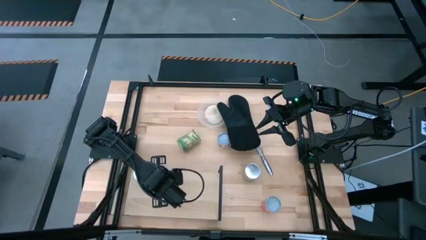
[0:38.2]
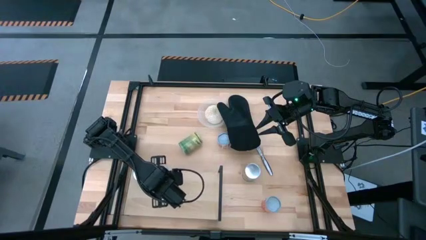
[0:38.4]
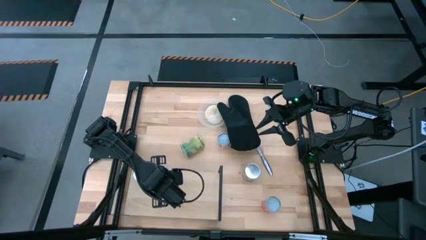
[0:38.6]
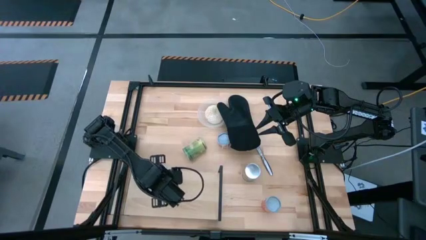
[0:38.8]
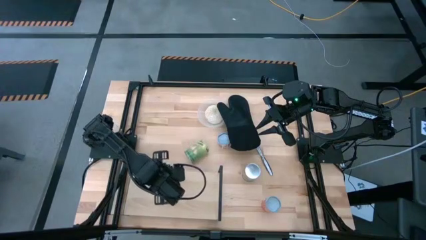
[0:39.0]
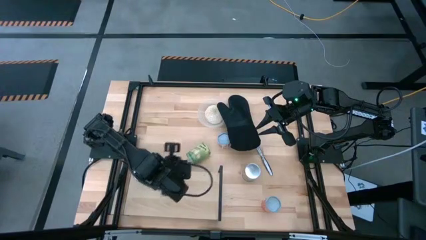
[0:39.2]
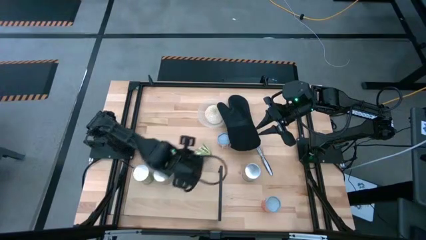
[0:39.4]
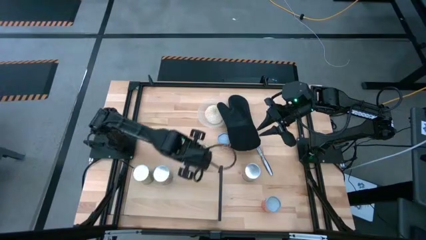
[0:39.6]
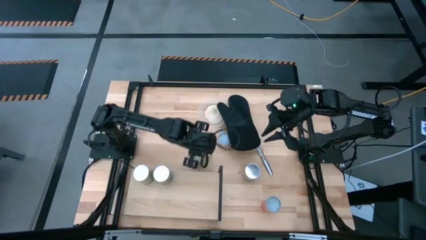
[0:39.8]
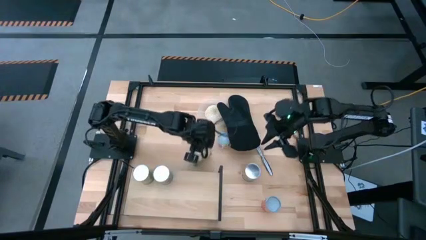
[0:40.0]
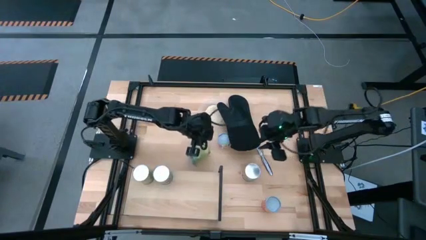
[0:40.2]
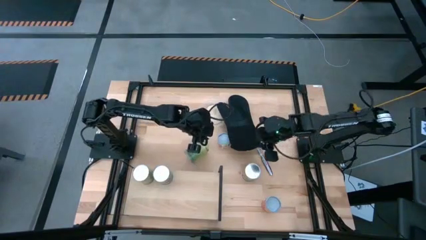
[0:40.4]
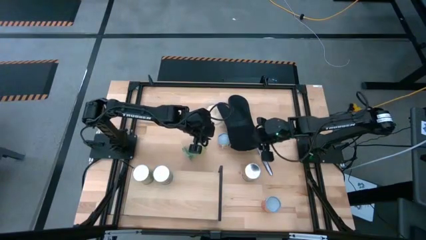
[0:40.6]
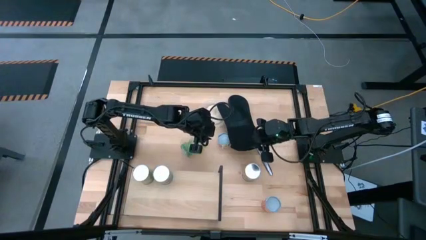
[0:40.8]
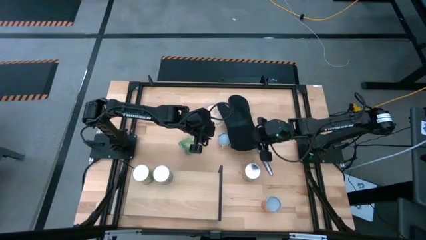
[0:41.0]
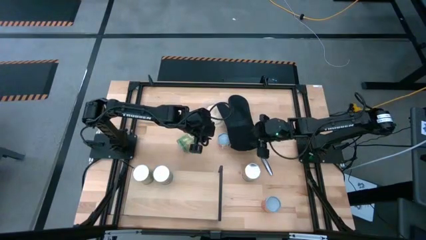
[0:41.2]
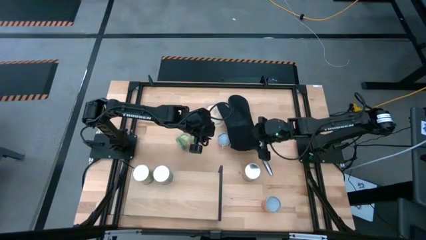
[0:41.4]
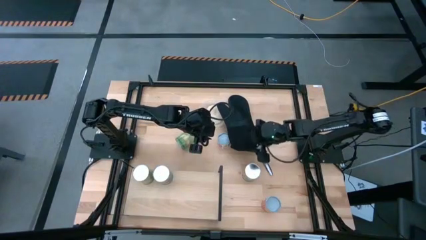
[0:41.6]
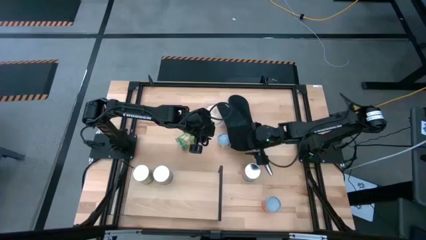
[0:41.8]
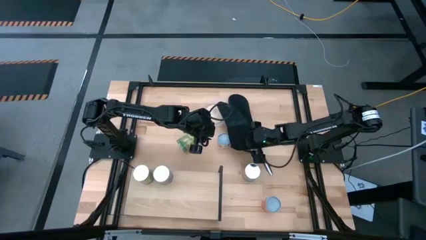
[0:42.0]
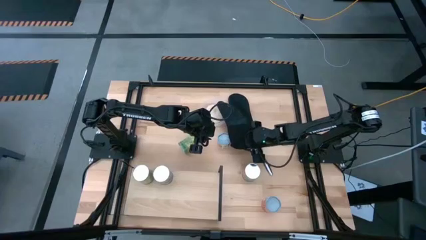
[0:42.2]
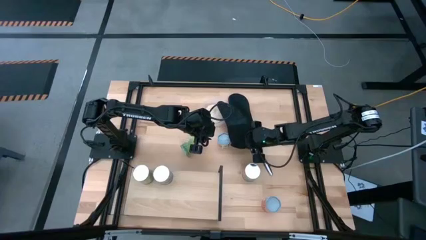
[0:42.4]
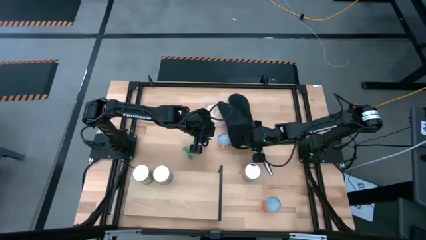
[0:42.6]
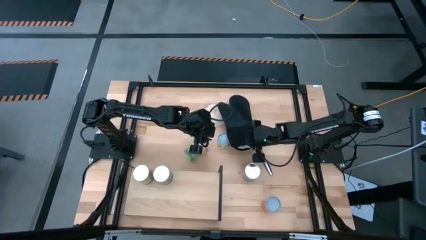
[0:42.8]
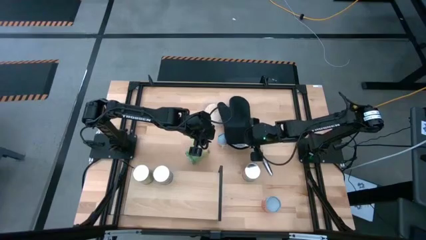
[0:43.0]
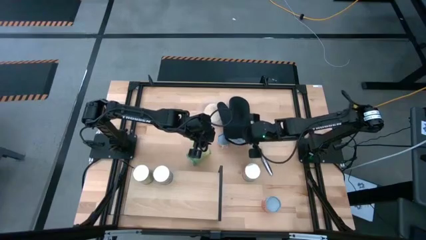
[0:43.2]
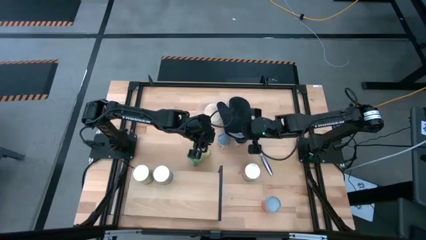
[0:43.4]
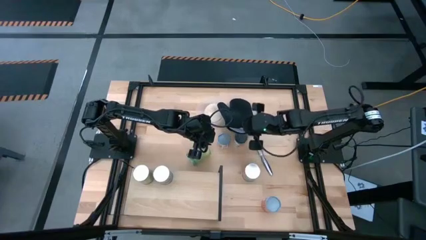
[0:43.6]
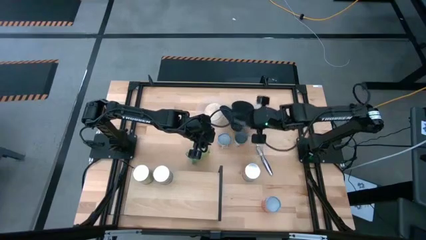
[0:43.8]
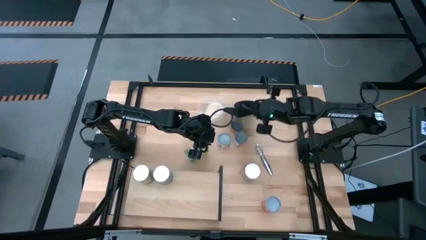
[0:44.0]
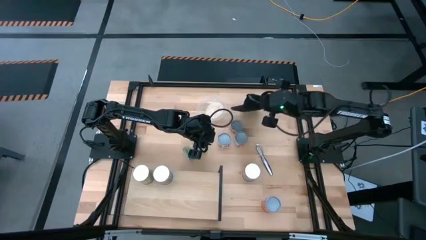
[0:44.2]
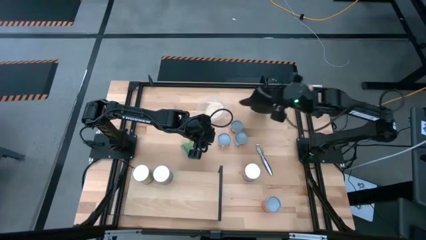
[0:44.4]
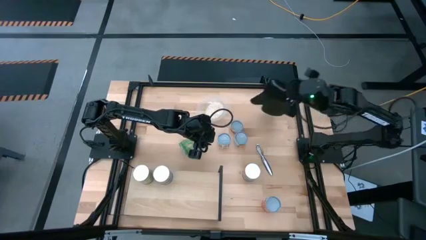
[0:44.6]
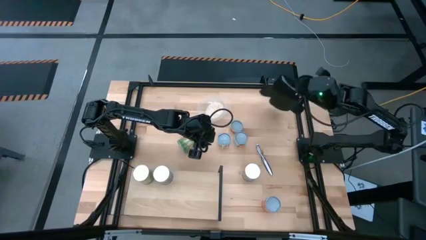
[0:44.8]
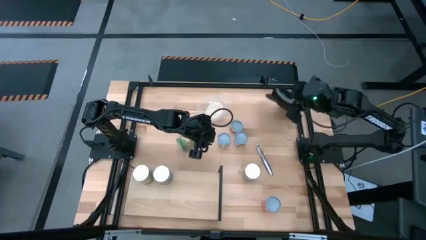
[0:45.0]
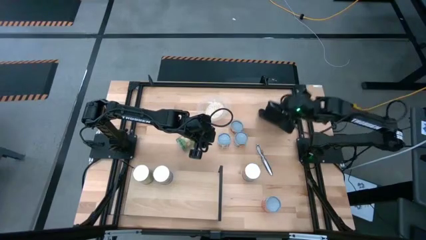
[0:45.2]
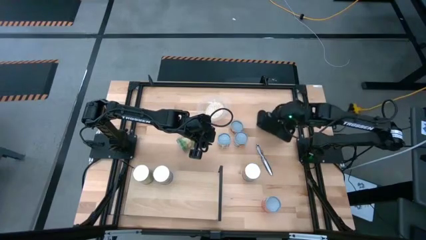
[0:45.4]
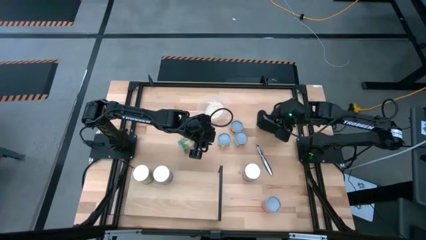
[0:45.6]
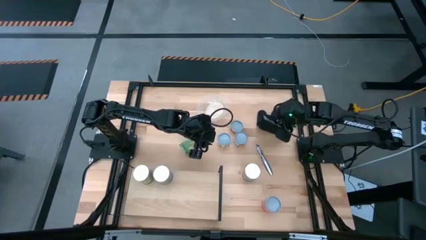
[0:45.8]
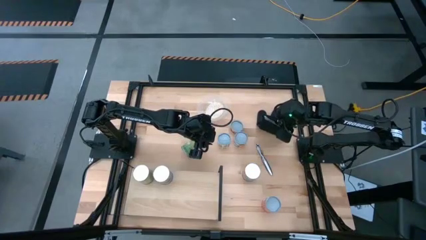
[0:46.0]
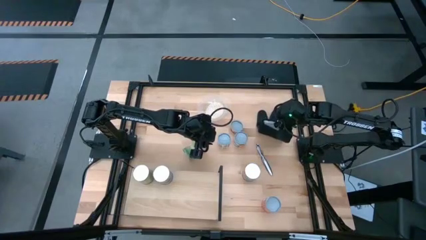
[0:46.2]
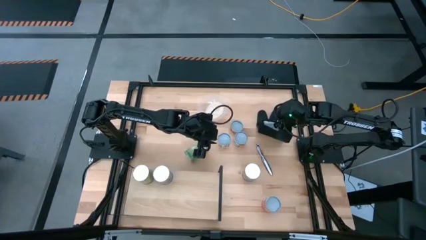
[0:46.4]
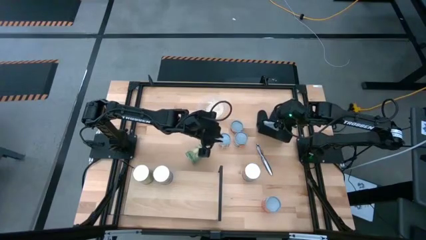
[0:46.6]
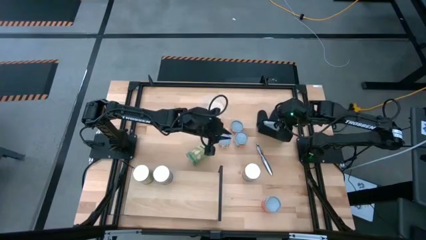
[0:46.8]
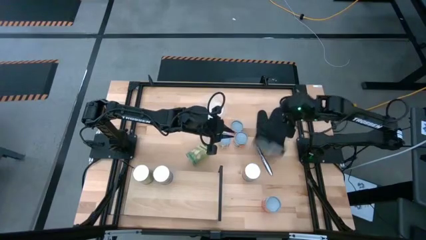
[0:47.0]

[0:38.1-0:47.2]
Task: Pick and place cans onto a shelf
Move the black oven mitt to the top right

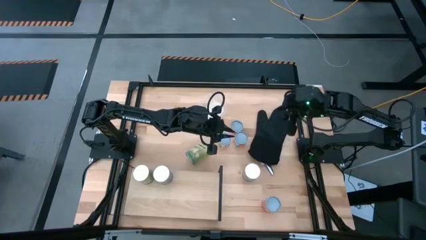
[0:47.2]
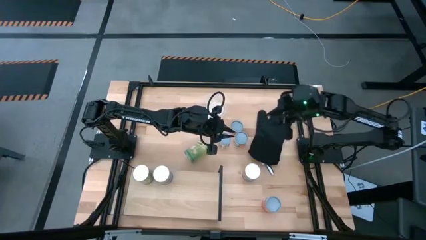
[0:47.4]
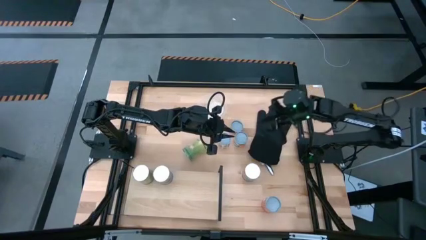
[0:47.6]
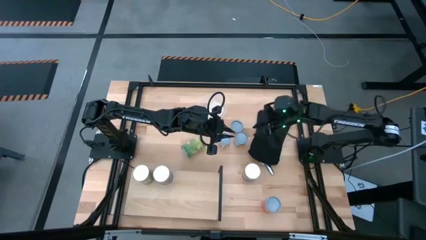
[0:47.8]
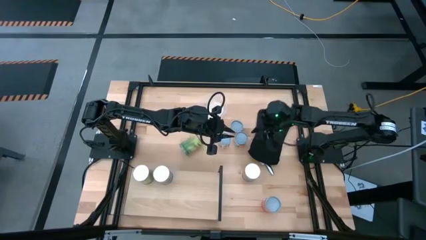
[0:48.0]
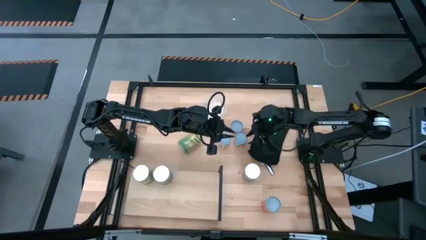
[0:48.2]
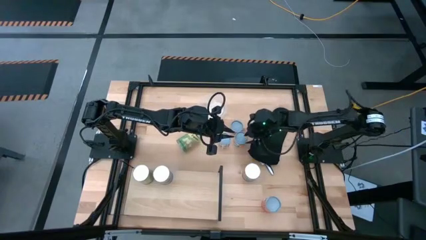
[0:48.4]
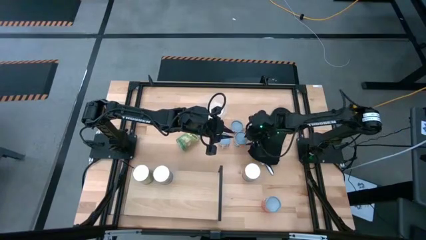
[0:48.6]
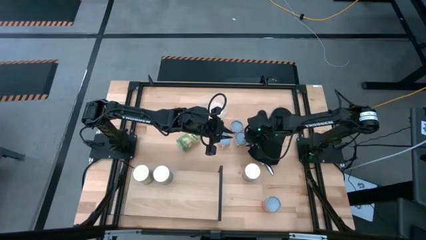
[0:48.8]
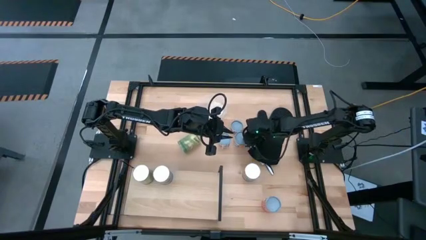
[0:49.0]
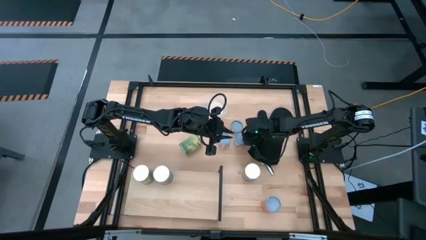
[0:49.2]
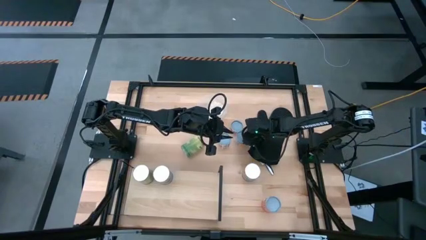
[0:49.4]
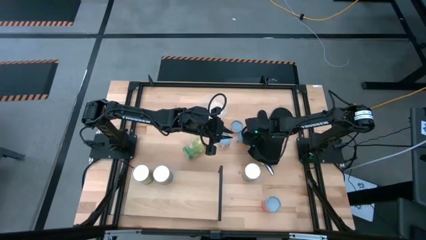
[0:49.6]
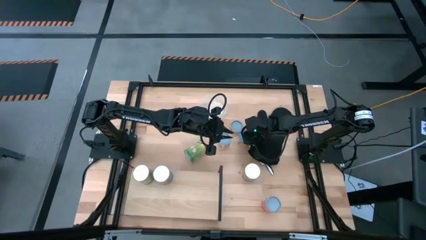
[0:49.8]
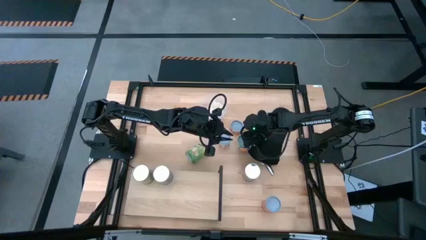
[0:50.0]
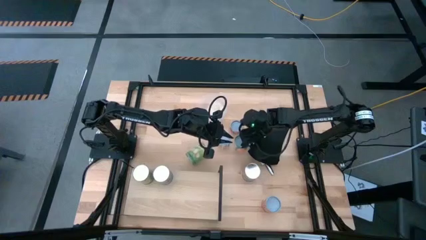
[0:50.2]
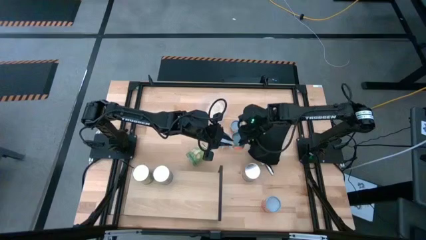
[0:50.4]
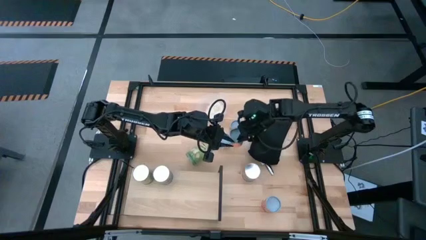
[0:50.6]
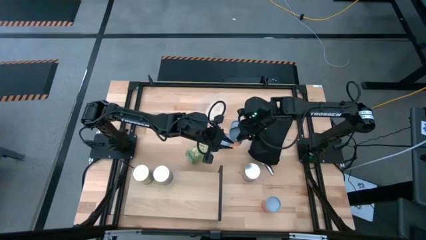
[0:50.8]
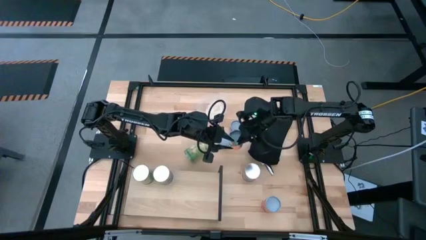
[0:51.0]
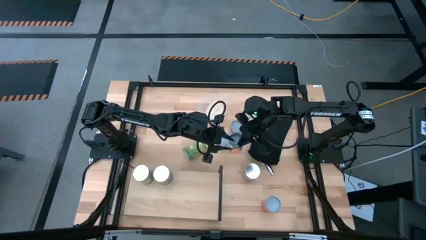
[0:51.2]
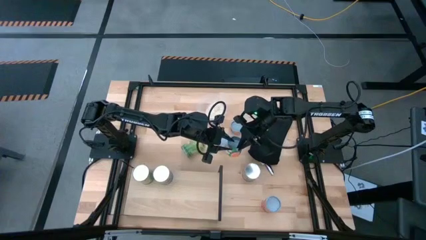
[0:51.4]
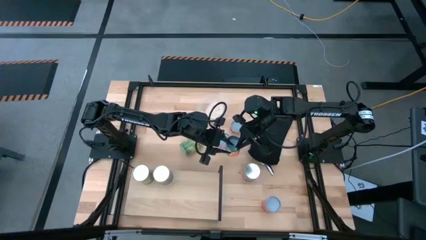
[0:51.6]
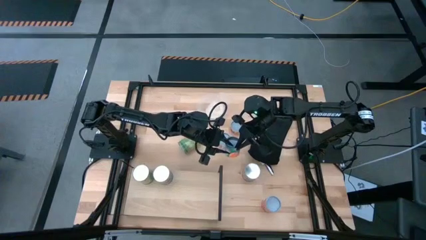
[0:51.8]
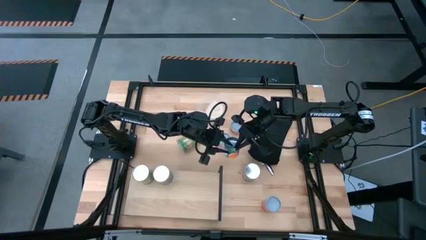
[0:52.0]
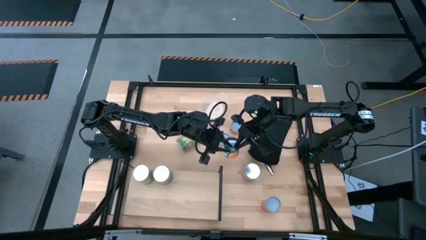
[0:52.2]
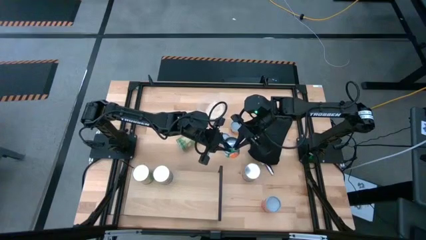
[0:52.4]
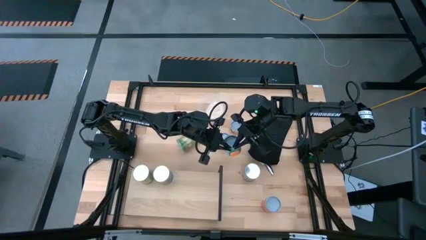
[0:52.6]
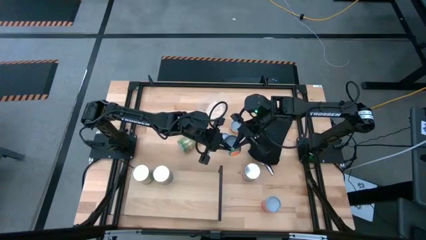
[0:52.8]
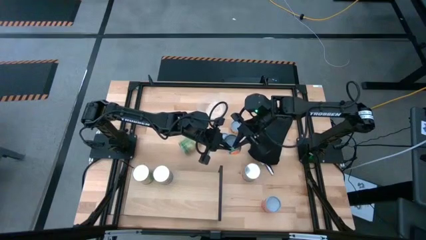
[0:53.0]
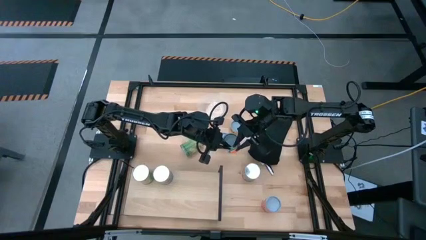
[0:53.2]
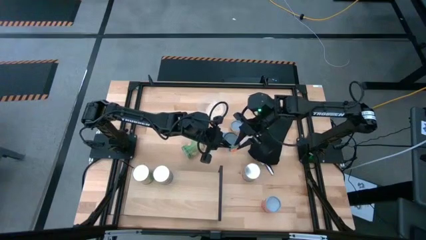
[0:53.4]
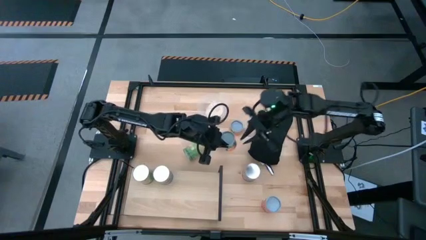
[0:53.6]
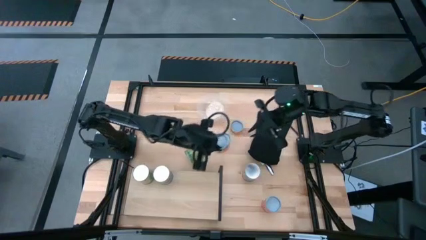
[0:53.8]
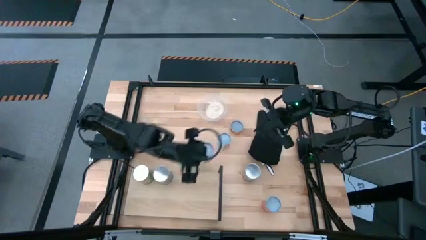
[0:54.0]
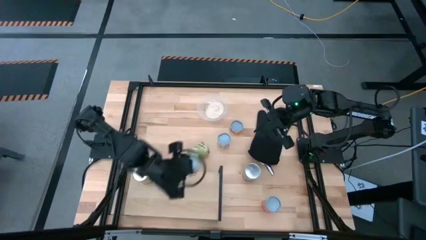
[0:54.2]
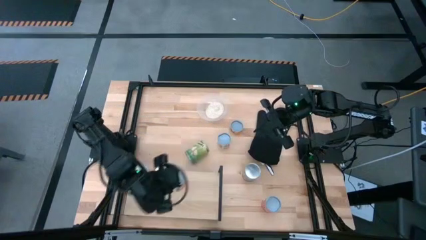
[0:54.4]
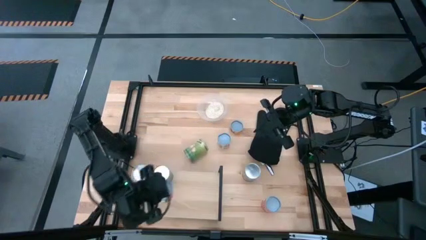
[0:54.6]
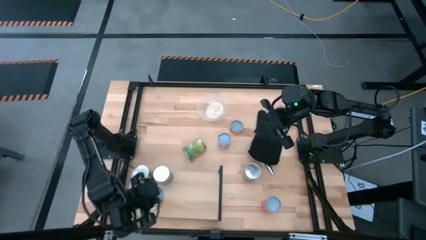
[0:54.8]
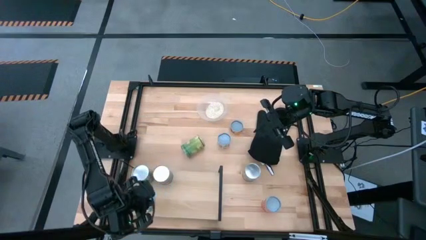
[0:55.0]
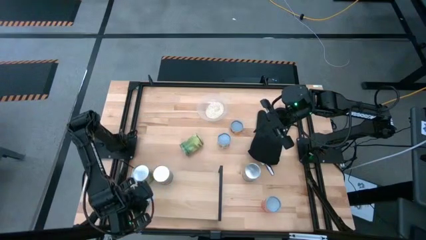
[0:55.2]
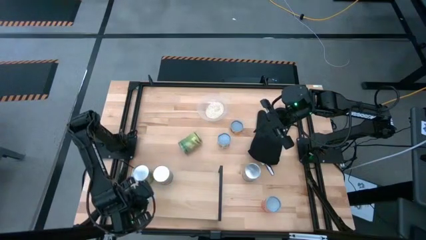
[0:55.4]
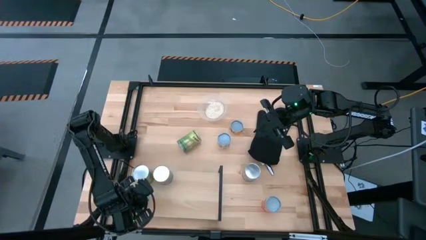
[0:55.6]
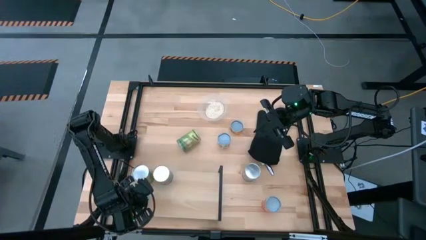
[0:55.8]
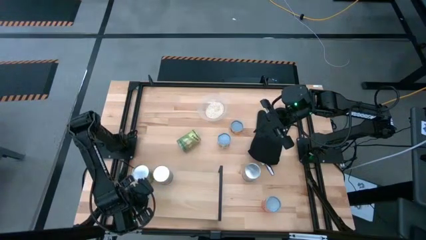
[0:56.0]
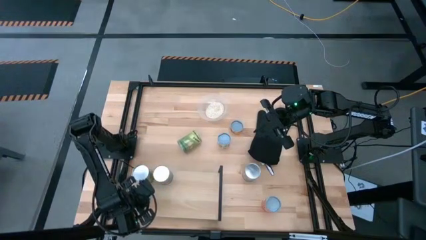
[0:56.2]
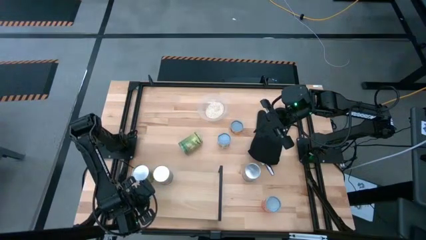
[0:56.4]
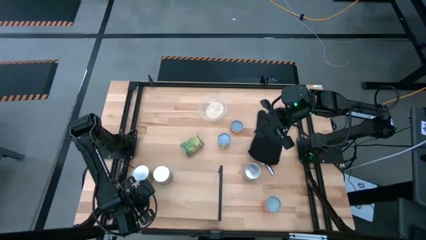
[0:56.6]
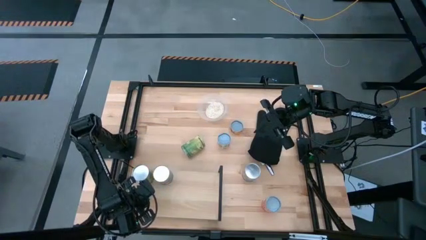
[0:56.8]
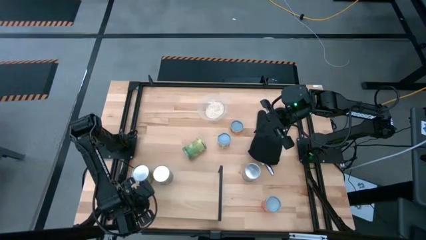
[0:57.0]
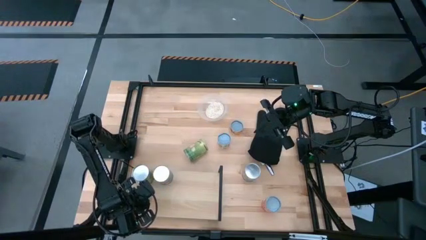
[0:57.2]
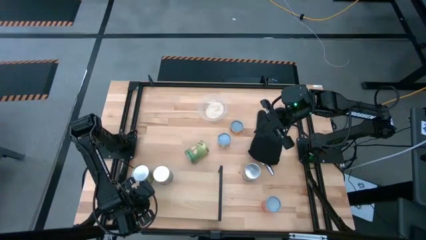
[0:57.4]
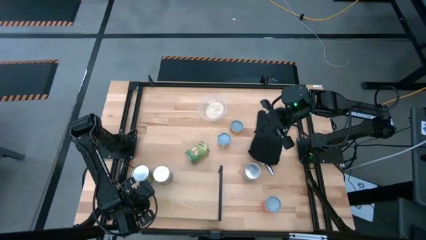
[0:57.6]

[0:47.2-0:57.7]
Put the orange canned orange on the shelf aligned with the other green canned orange
